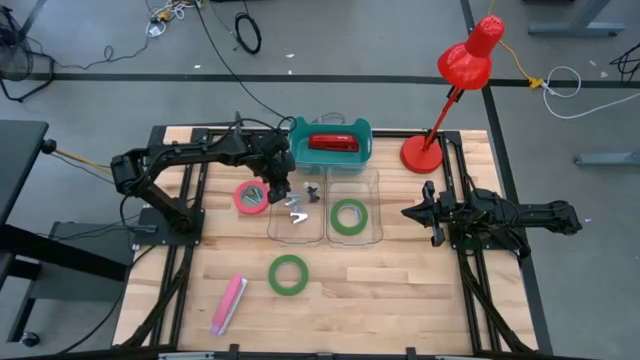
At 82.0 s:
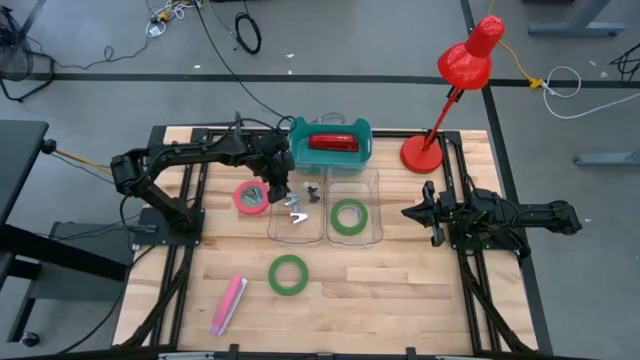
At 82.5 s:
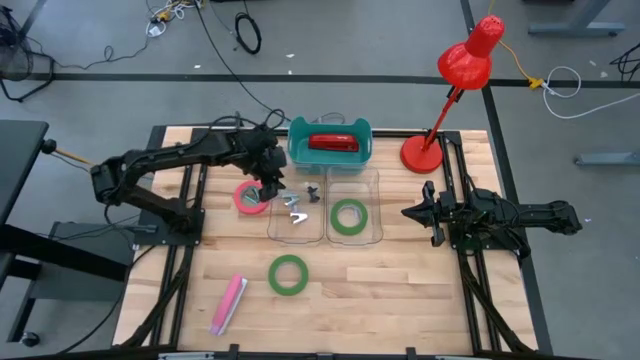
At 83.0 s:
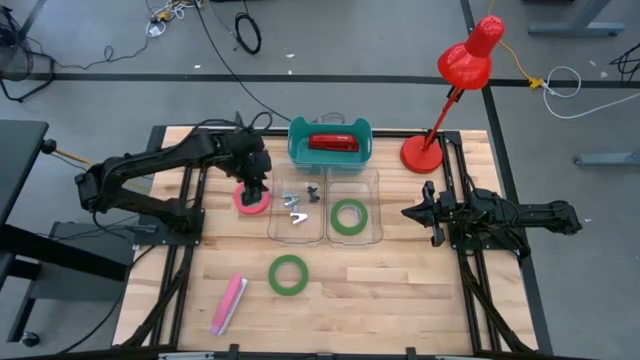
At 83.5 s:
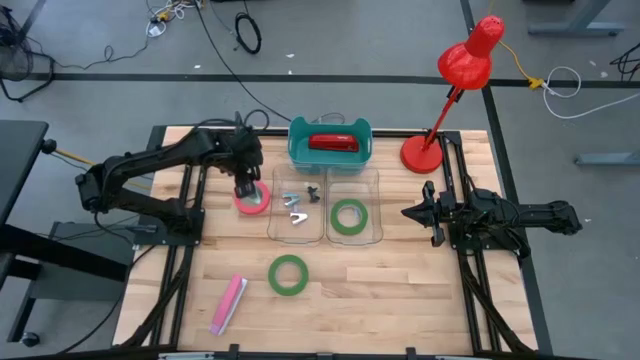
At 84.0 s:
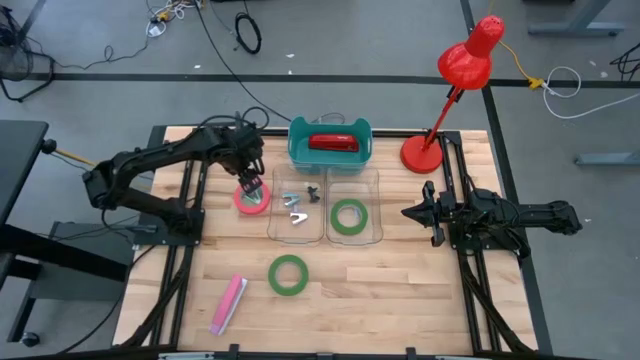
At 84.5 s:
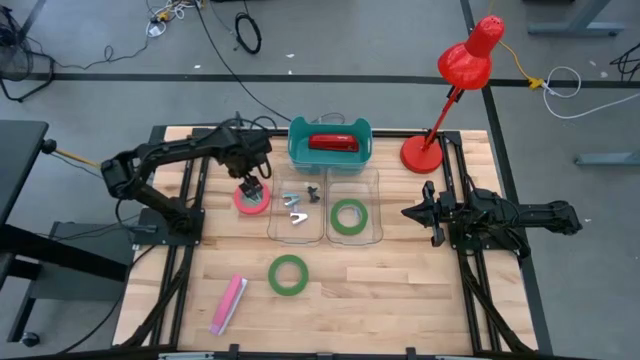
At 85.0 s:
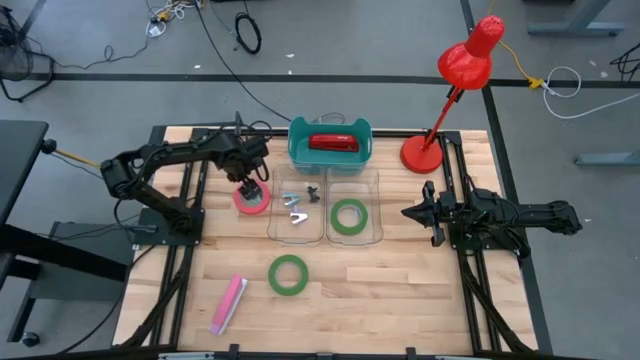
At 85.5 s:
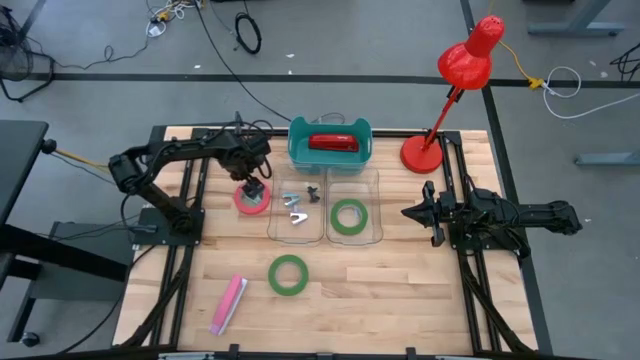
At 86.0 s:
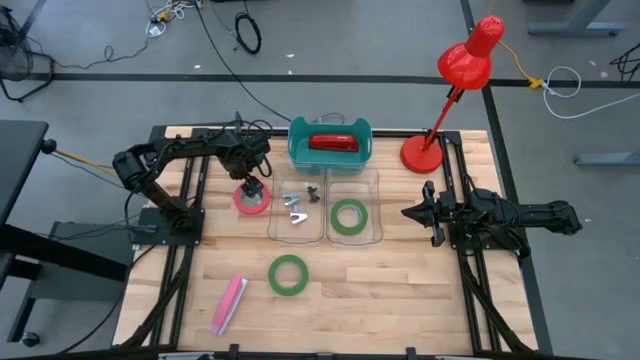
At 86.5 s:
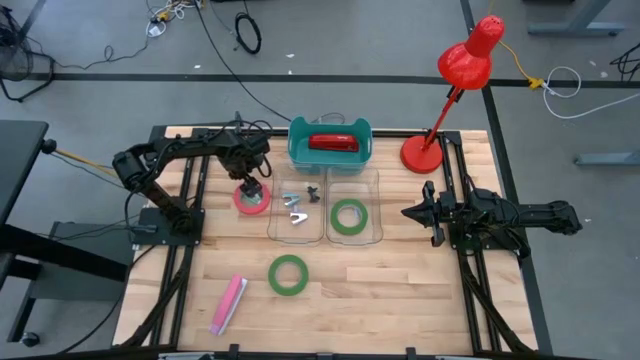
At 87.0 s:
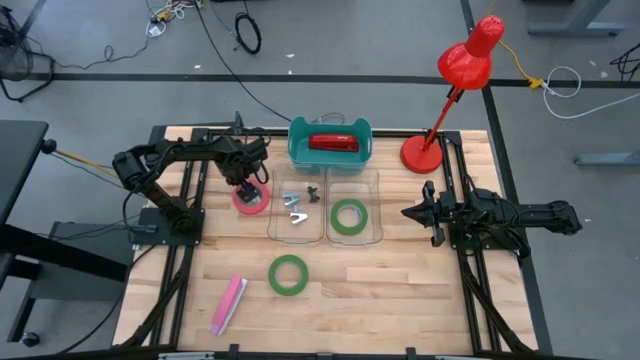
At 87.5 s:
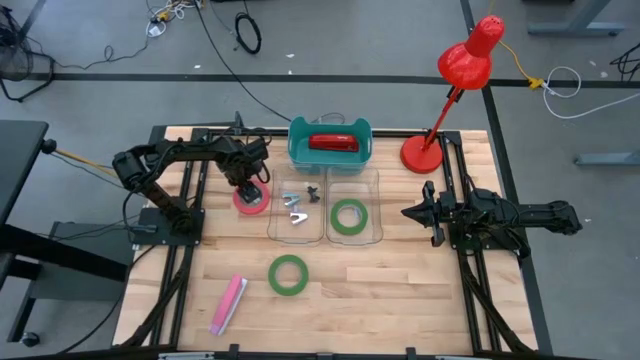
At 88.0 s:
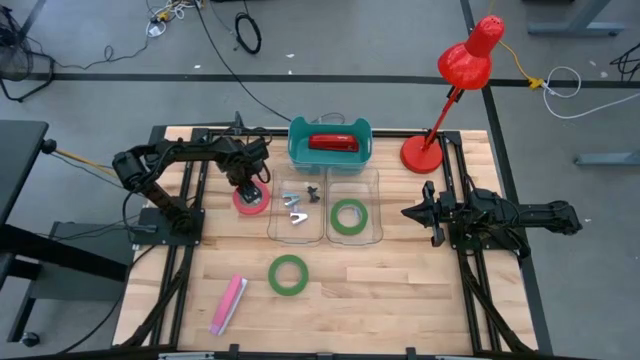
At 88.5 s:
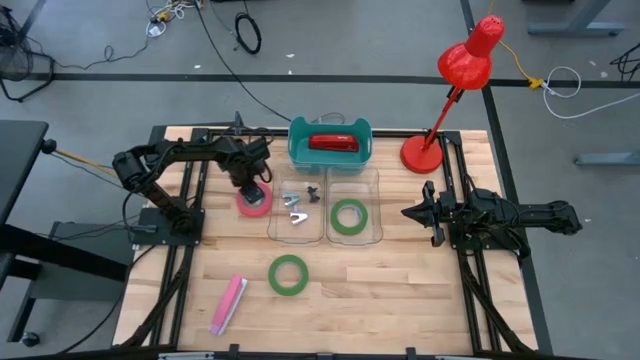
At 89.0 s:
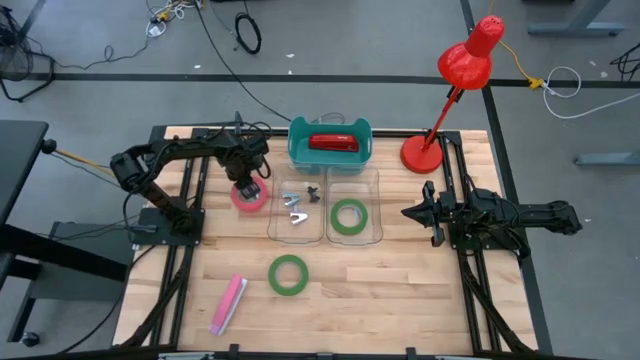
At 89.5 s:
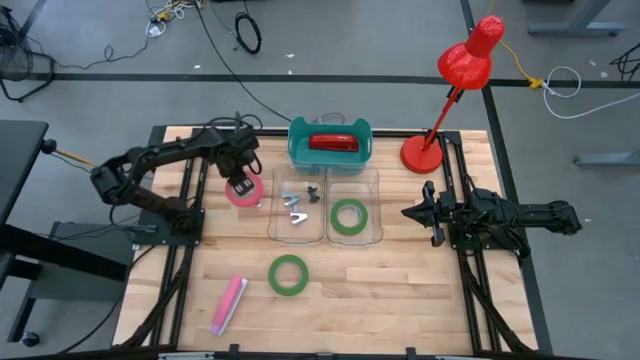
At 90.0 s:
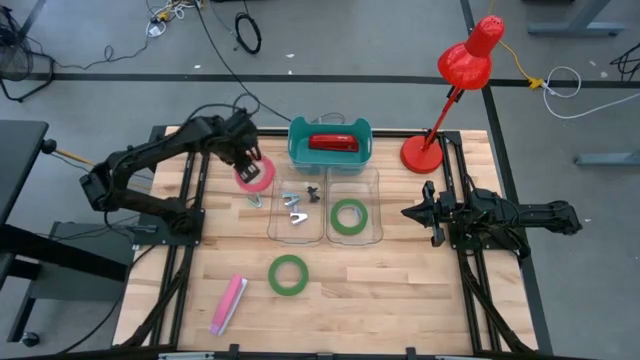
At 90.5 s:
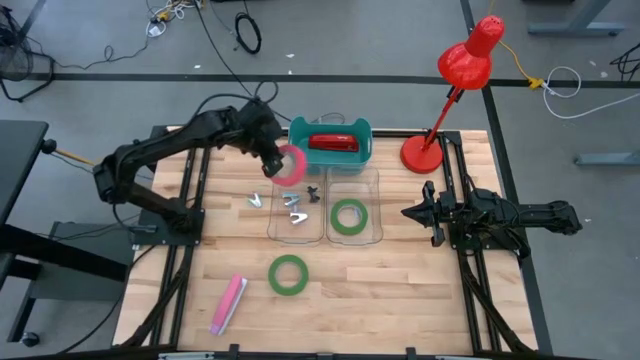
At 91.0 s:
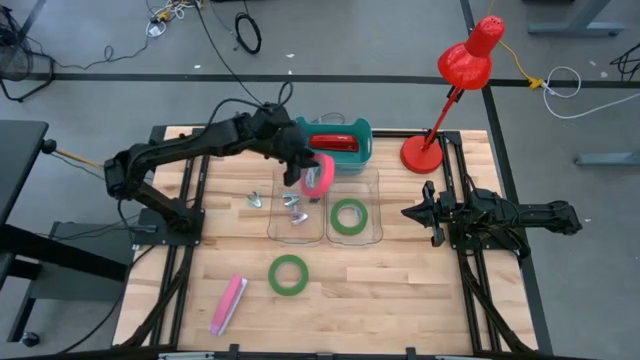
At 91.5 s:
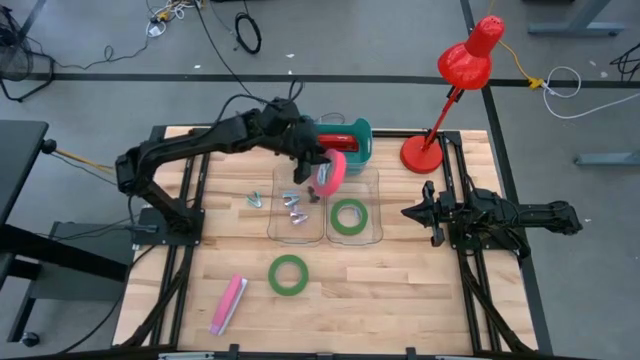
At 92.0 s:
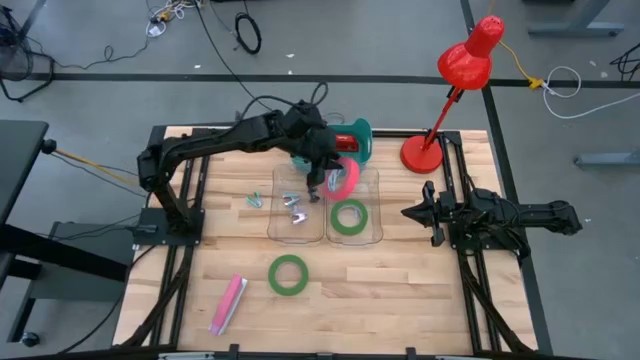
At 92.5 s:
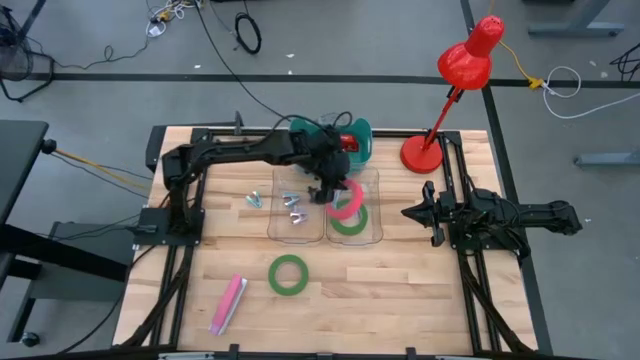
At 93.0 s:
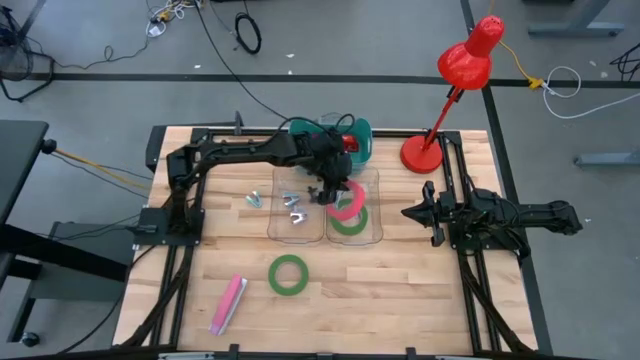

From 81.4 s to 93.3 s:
Task: Pick and place Stapler, Stapler remover, tape
Put the pink tape into the right transparent bin

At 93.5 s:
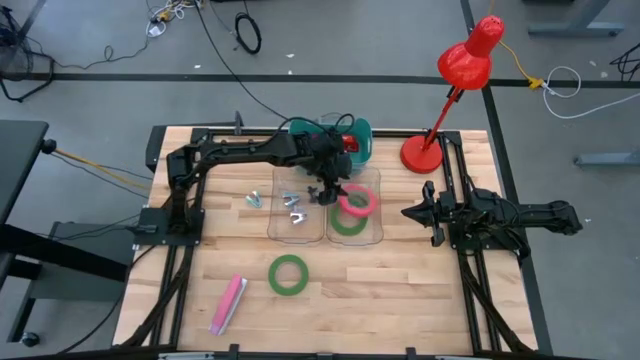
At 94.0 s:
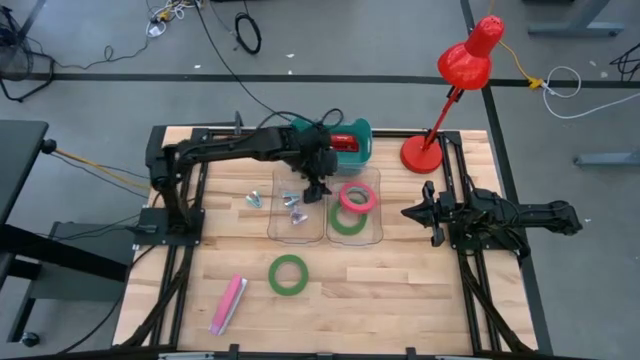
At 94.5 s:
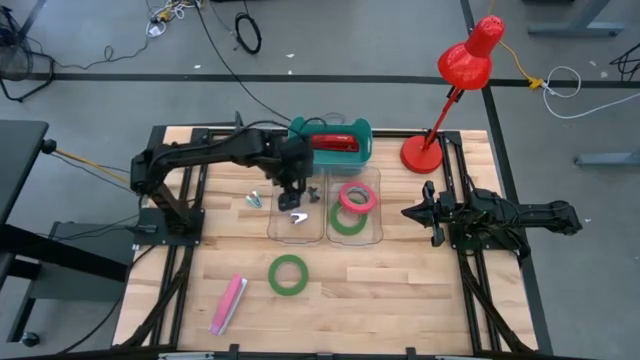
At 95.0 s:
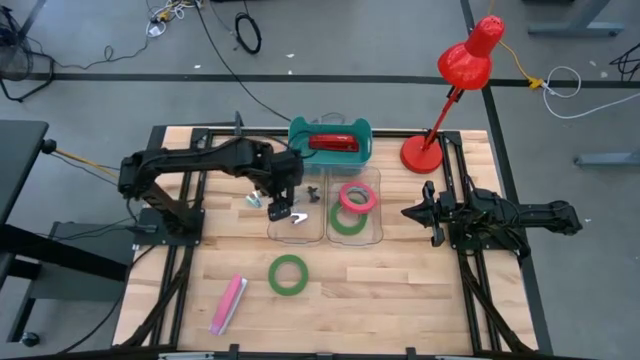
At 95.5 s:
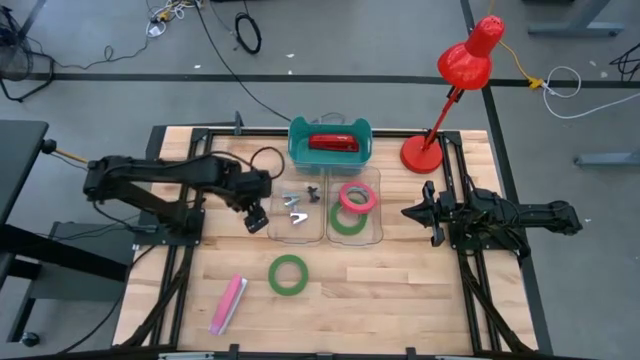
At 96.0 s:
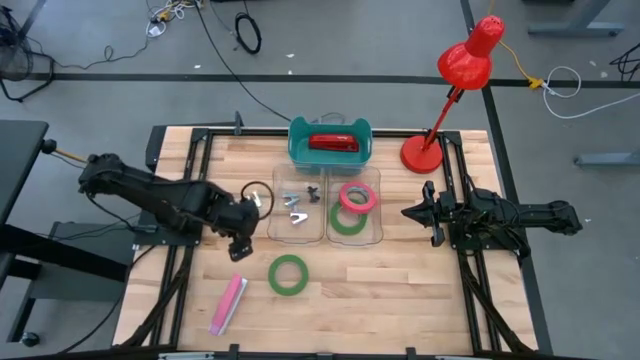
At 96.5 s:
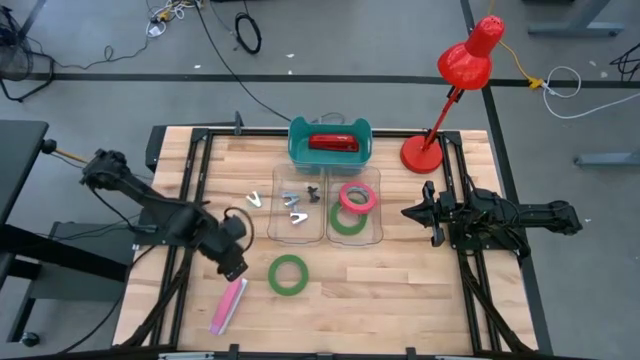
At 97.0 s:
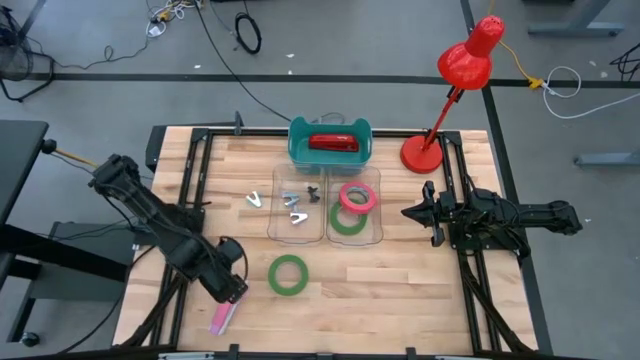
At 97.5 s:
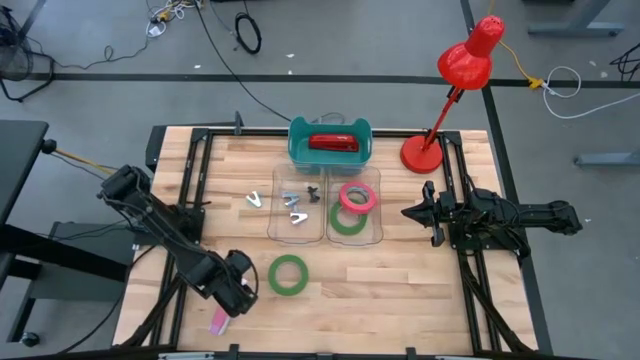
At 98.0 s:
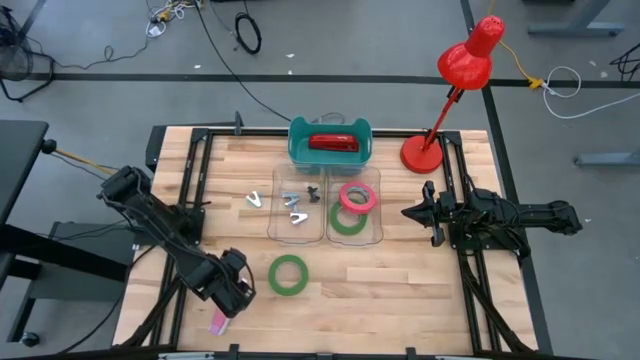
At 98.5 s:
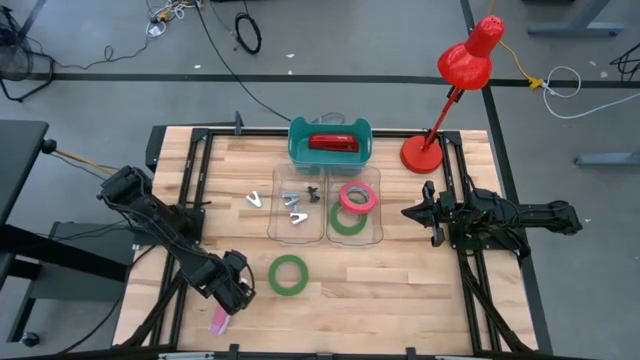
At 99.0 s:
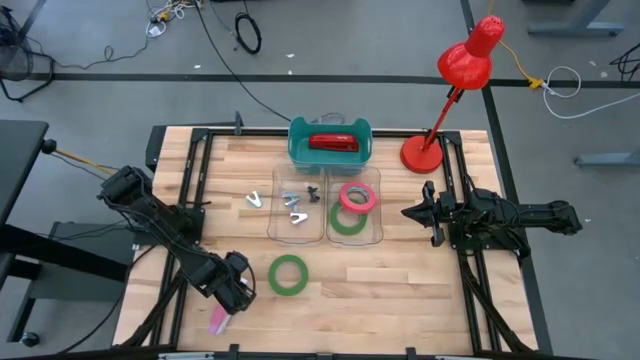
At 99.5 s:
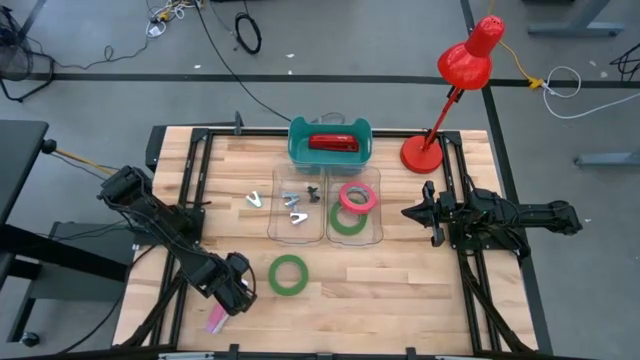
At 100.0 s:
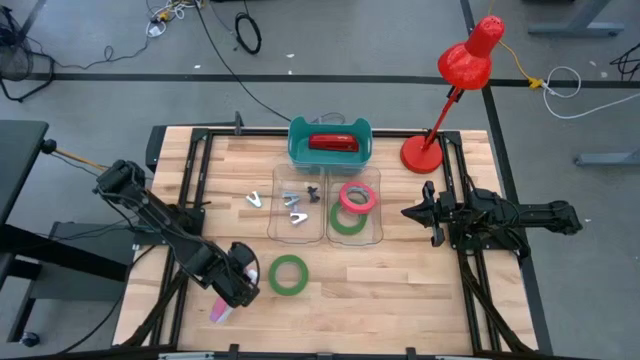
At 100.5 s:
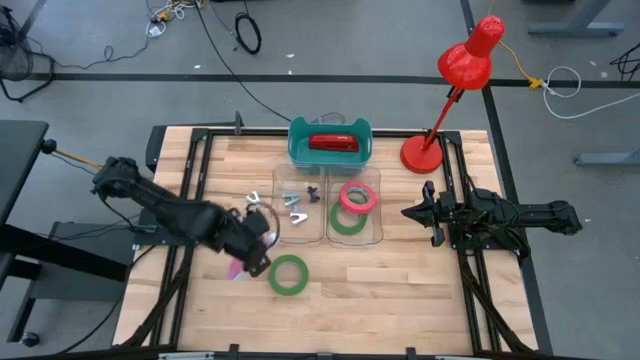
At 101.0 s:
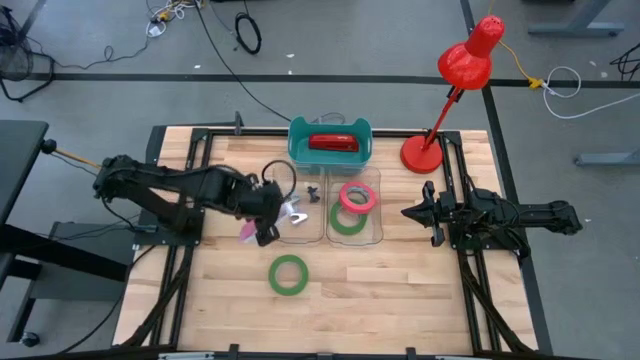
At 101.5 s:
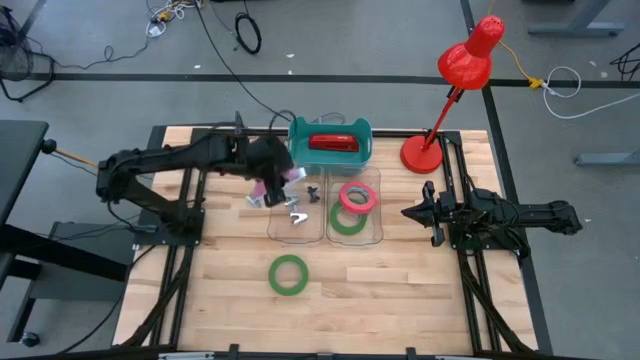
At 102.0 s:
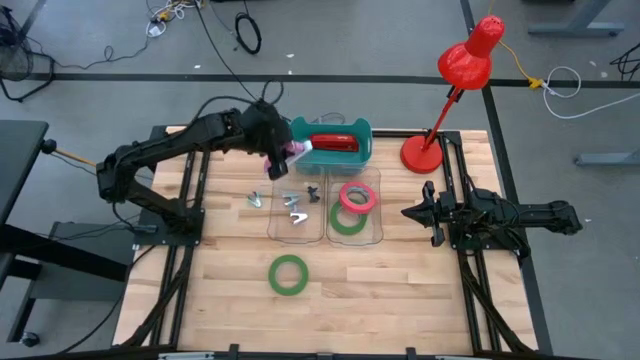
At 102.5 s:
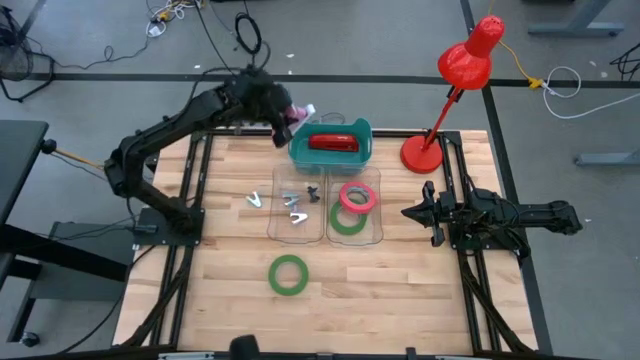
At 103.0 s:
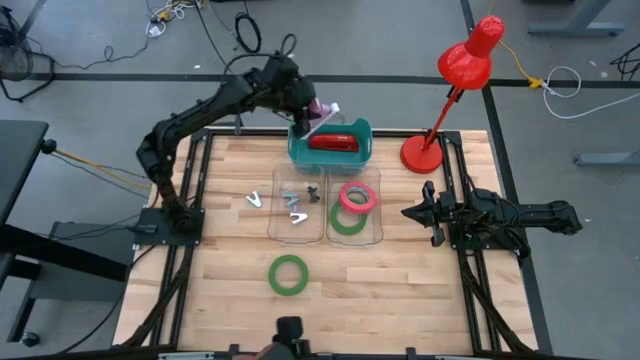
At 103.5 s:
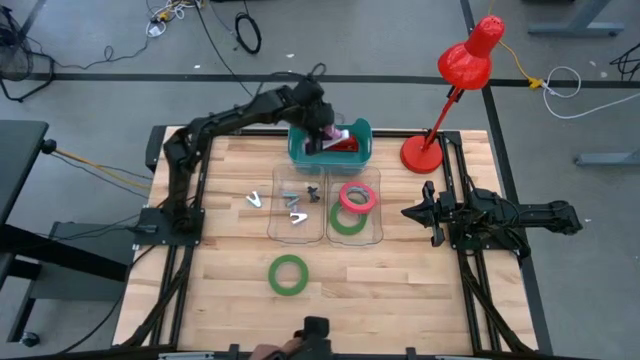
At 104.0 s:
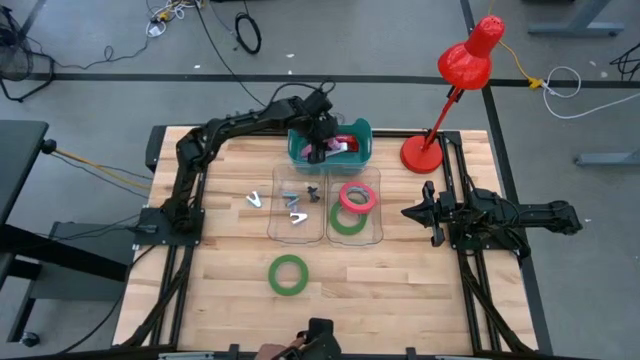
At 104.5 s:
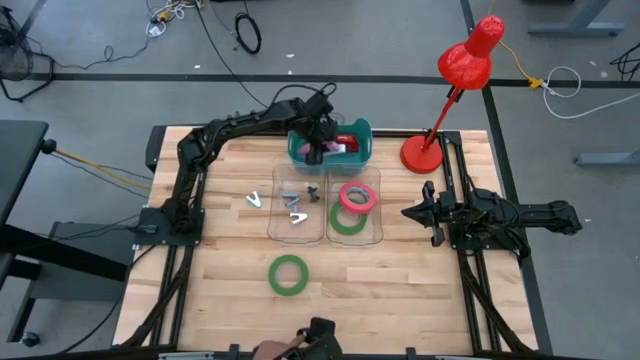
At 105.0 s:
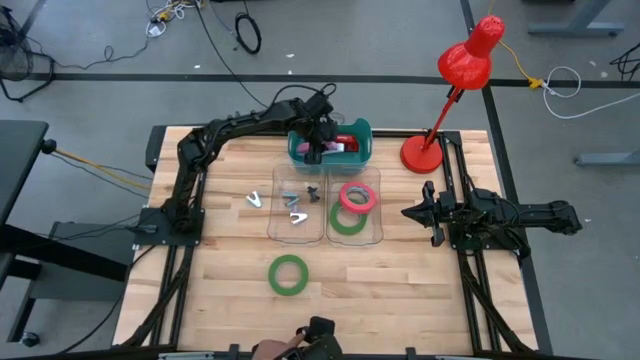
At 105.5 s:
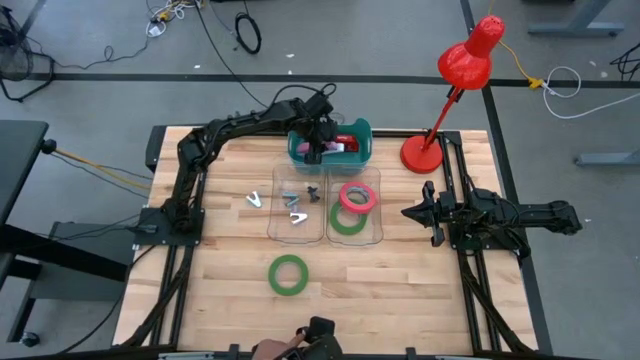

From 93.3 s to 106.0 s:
Put the pink stapler into the blue bin
